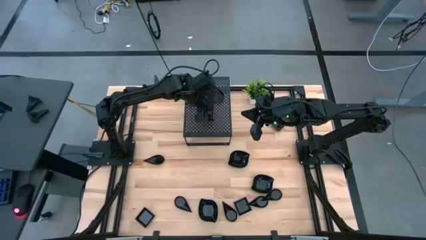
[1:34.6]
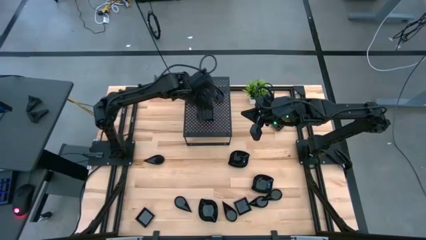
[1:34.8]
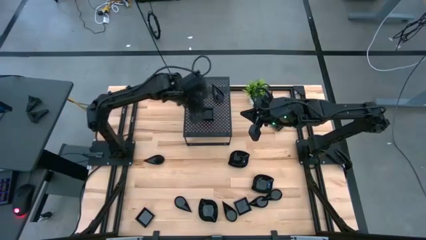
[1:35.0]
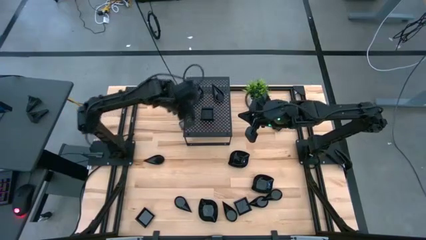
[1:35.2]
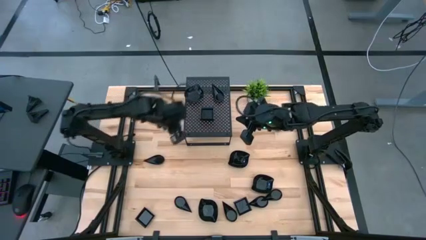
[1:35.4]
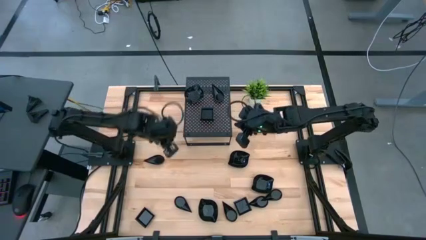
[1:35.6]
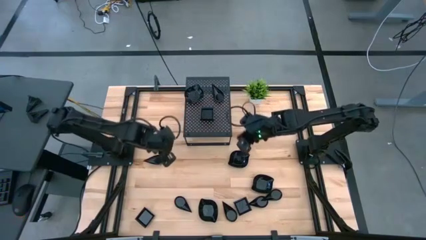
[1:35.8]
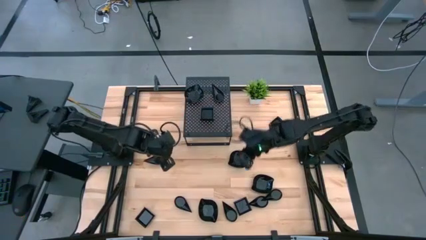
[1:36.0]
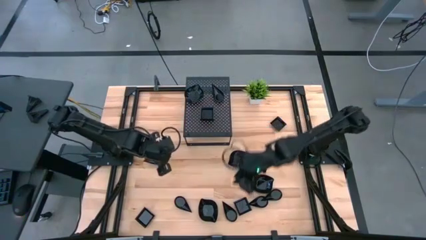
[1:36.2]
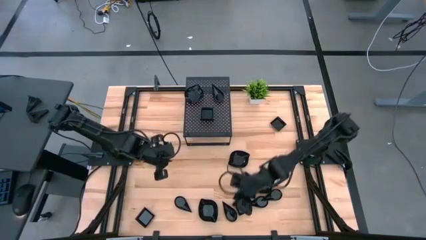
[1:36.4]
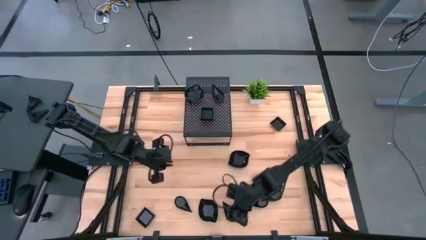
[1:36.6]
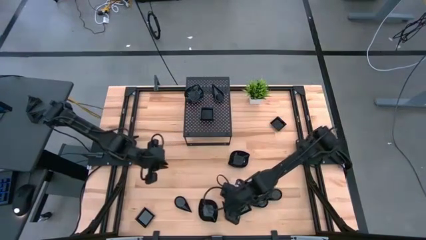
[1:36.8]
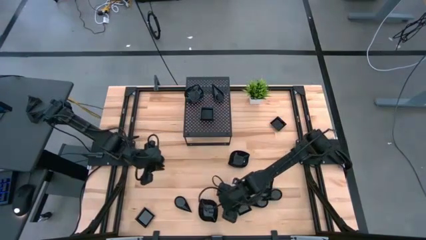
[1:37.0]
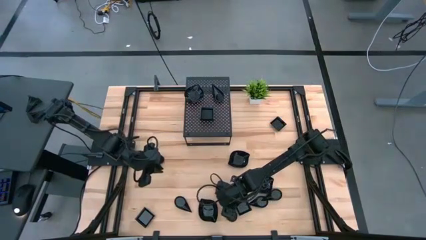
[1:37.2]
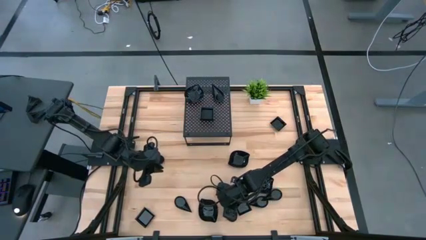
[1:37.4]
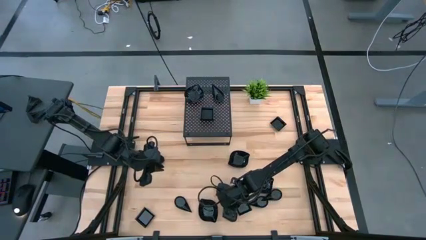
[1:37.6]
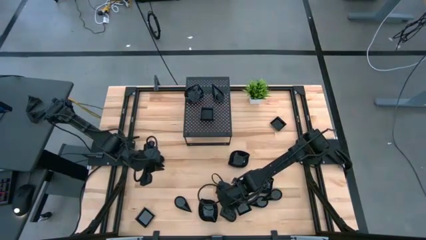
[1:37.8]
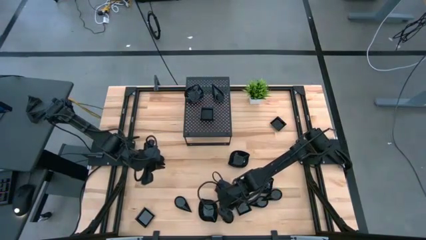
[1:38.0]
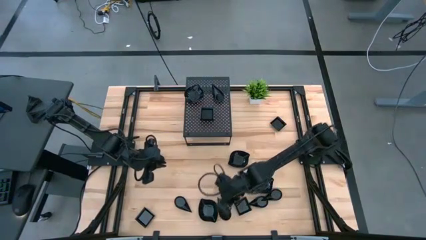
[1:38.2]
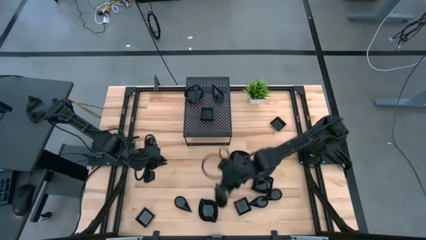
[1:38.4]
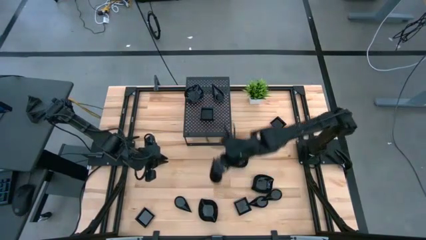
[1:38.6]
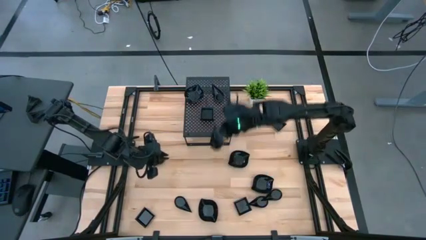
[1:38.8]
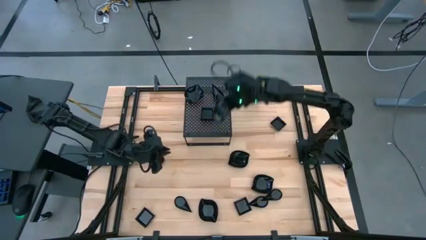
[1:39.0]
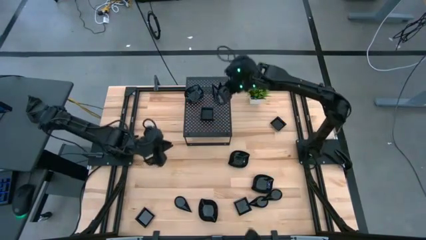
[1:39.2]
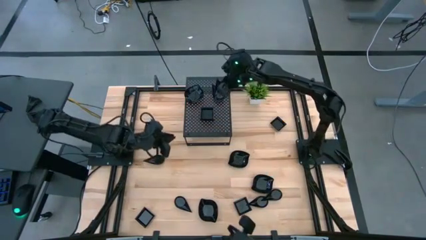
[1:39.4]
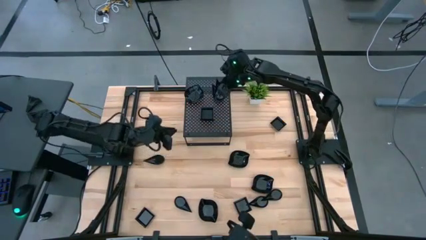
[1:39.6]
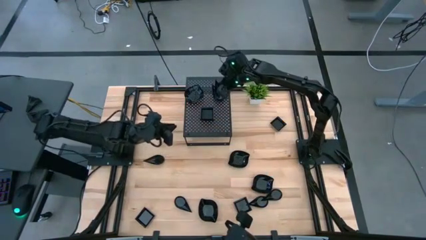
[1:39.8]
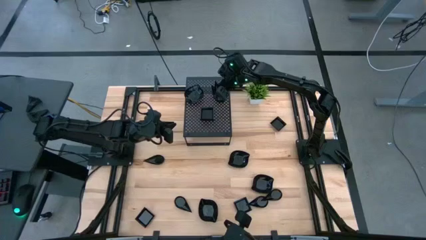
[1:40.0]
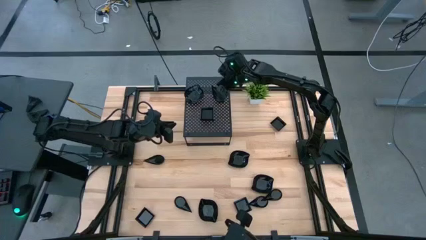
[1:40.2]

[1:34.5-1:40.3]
Task: Pick & Place Mini shaped plates
Stack the drop shaped plate on top of the drop shaped plates on the shelf

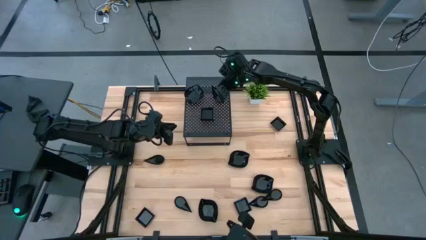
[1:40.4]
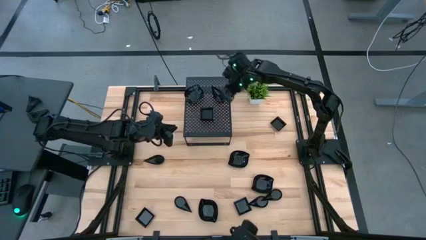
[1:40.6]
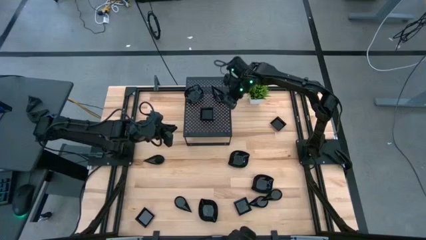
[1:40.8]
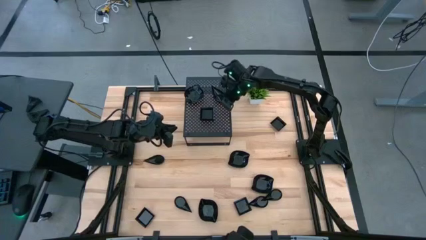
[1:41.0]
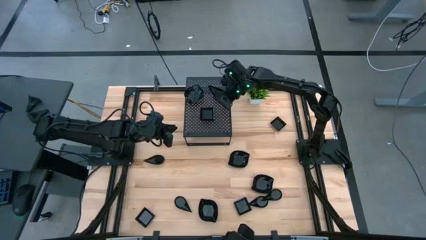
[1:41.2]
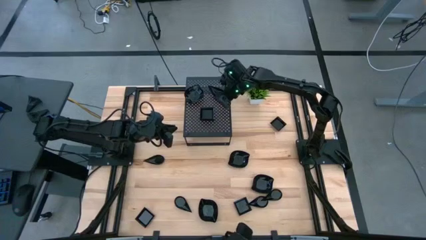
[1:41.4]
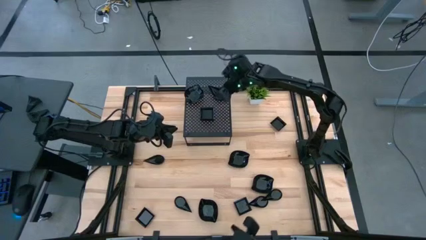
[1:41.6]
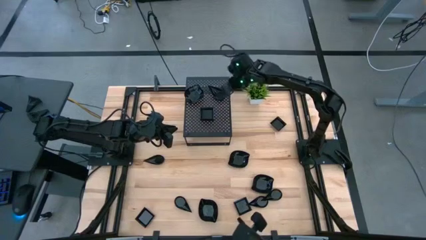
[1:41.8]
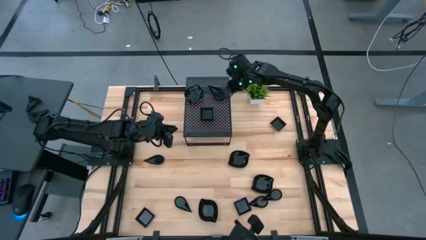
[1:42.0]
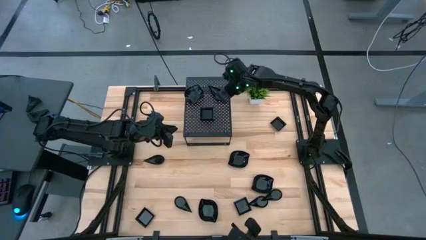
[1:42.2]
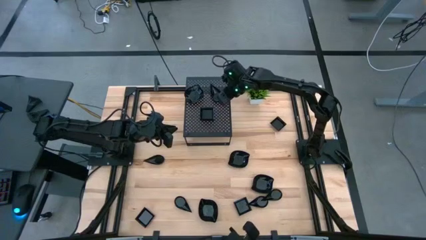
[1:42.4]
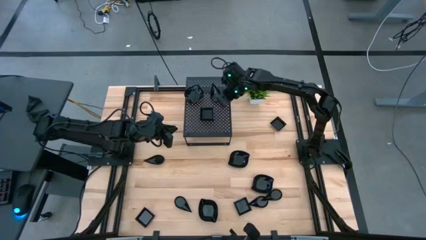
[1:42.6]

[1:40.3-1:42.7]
Adjust the stack of drop shaped plate on the shelf

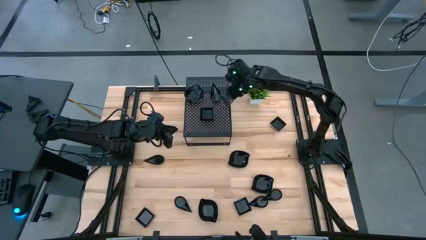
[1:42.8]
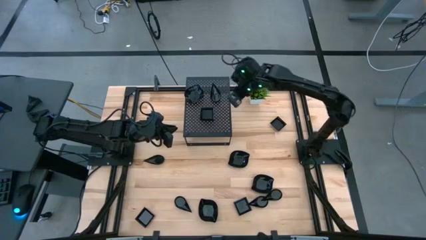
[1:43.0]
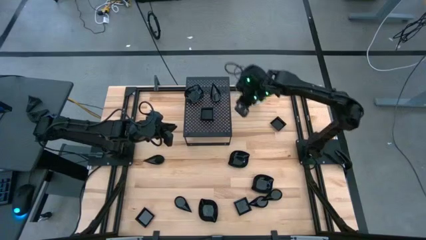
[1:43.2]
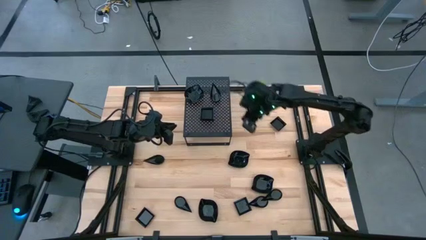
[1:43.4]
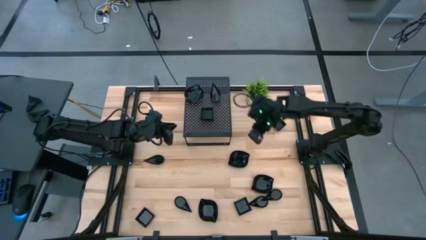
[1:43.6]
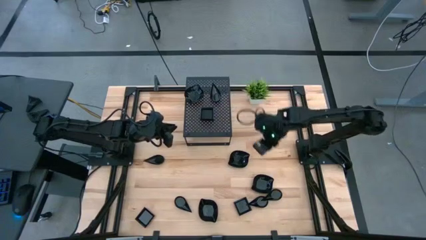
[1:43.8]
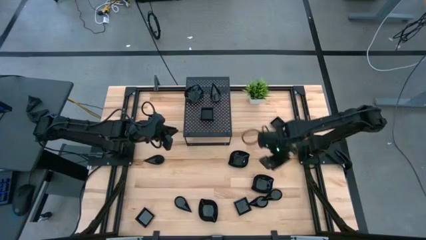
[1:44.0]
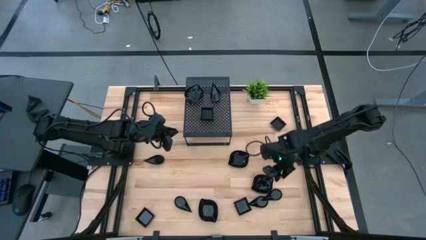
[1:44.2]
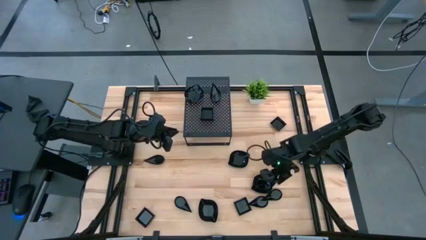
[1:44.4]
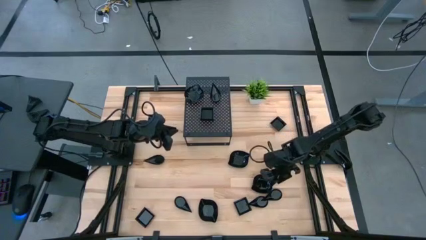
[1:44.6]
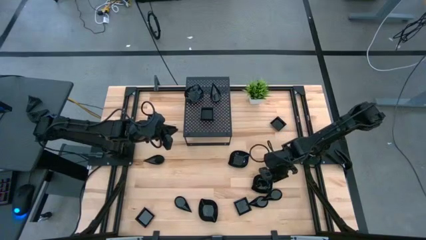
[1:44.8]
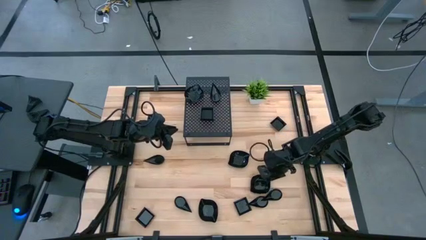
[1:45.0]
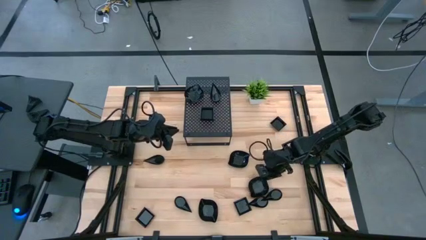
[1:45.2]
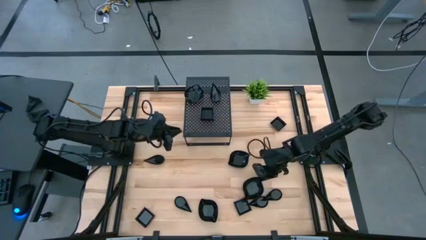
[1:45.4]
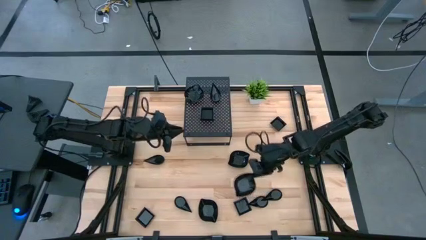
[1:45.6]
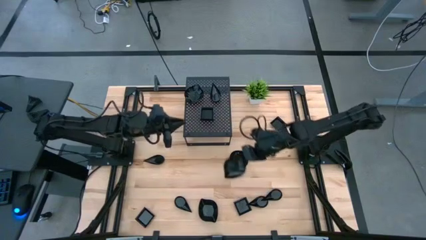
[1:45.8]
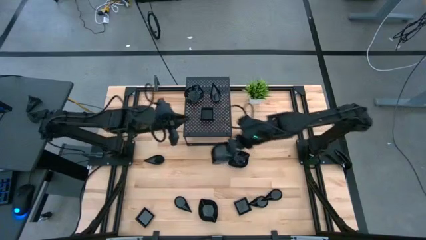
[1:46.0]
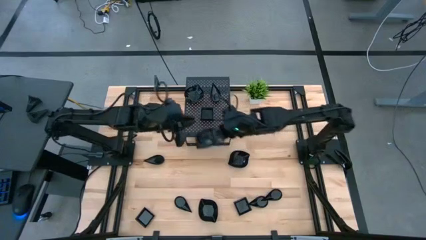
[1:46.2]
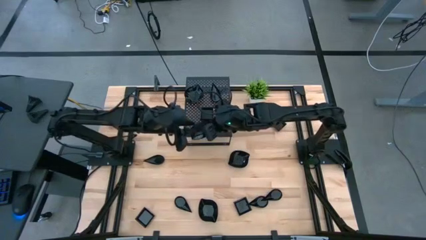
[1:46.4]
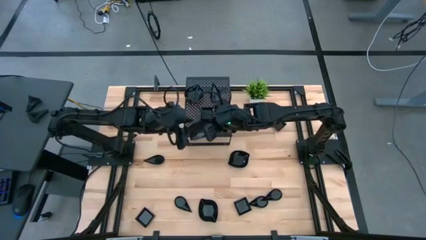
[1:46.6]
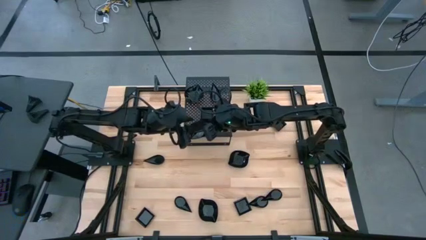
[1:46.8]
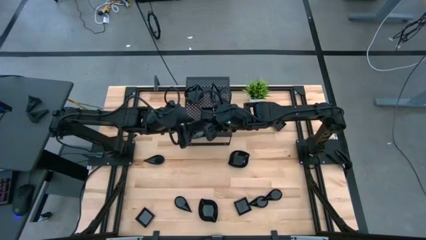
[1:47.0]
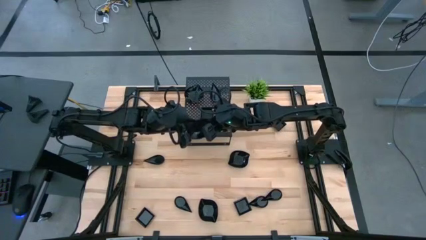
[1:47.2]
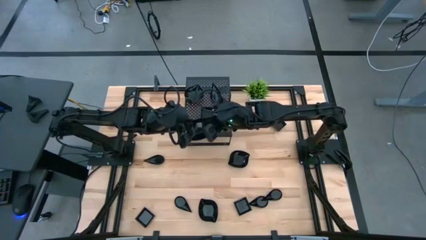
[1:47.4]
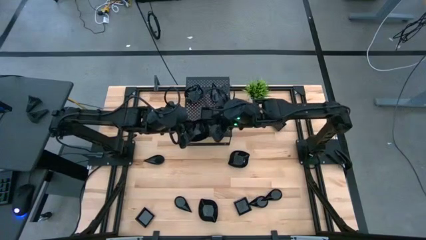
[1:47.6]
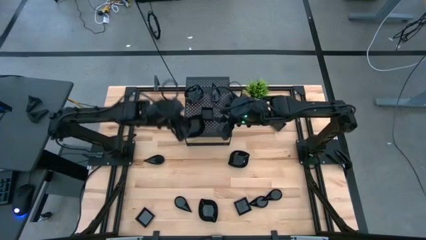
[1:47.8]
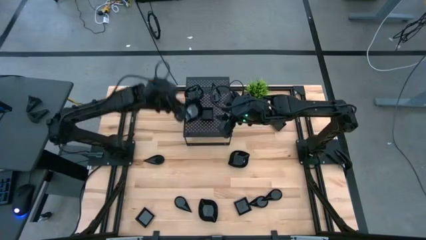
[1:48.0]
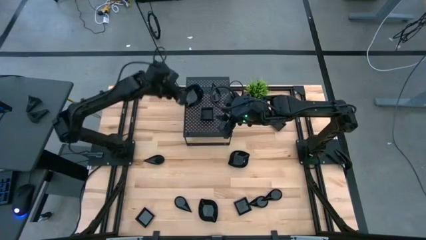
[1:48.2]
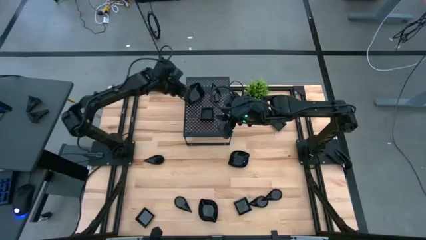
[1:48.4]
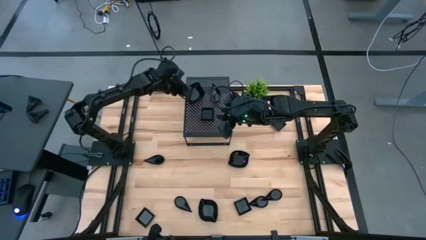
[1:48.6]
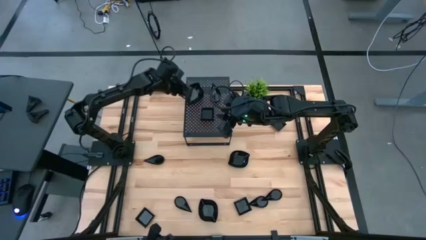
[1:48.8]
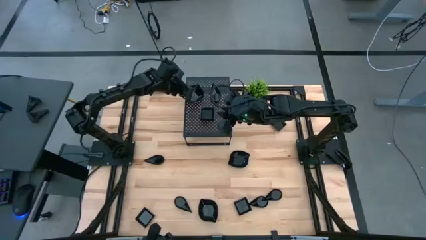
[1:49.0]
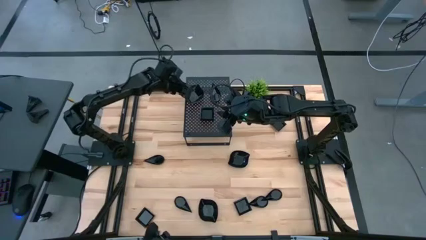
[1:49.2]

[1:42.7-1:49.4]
Stack the leaf shaped plate on top of the leaf shaped plate on the shelf
